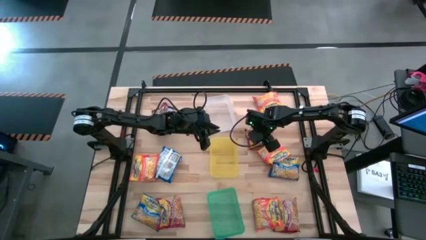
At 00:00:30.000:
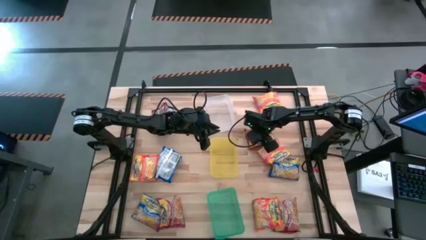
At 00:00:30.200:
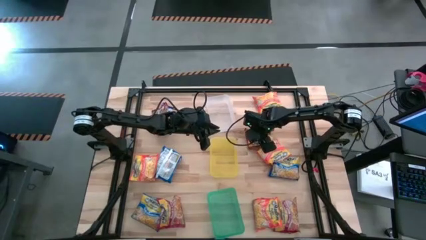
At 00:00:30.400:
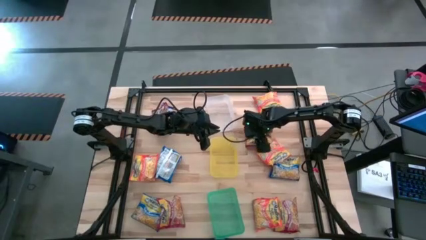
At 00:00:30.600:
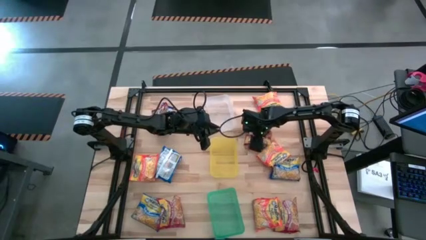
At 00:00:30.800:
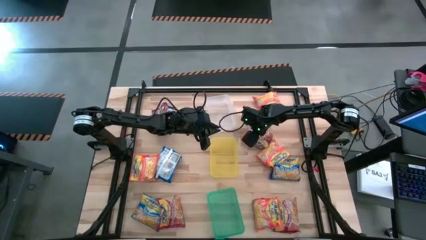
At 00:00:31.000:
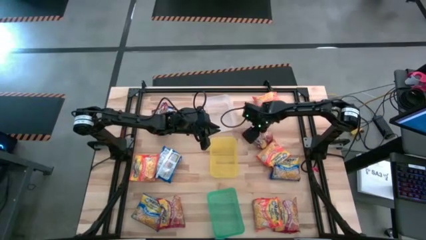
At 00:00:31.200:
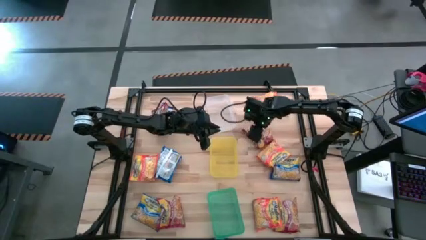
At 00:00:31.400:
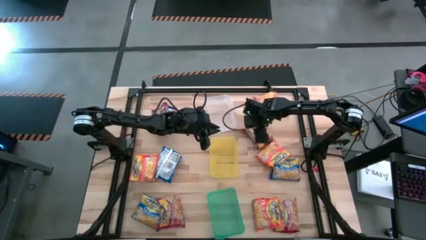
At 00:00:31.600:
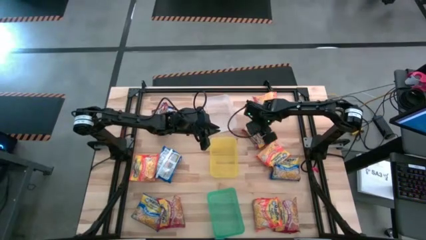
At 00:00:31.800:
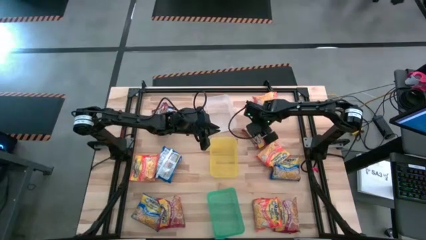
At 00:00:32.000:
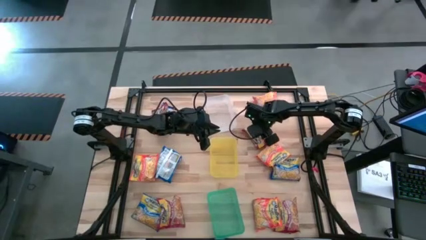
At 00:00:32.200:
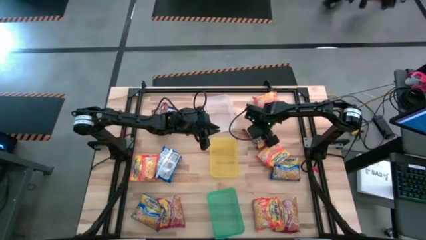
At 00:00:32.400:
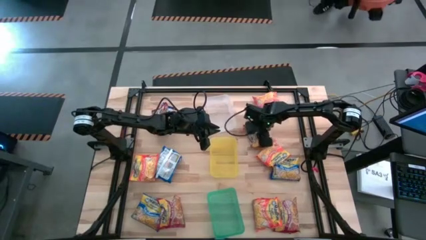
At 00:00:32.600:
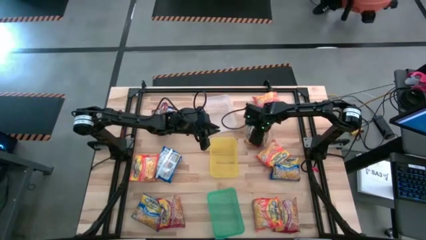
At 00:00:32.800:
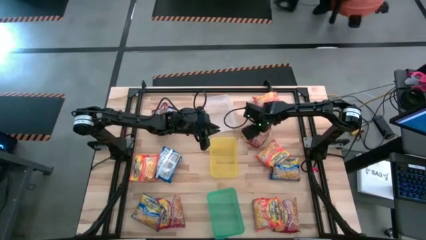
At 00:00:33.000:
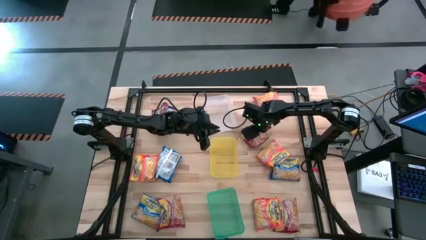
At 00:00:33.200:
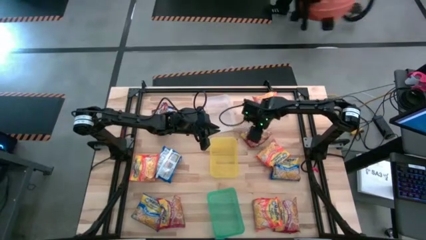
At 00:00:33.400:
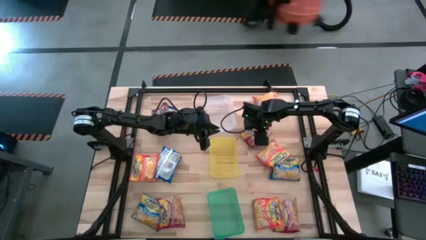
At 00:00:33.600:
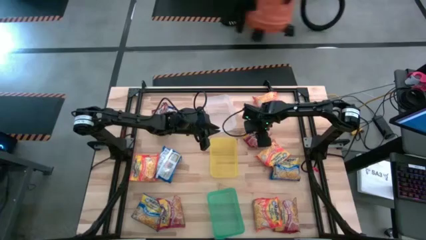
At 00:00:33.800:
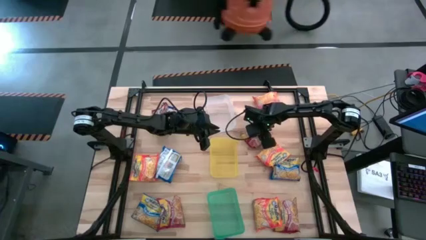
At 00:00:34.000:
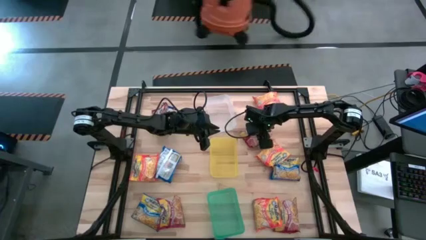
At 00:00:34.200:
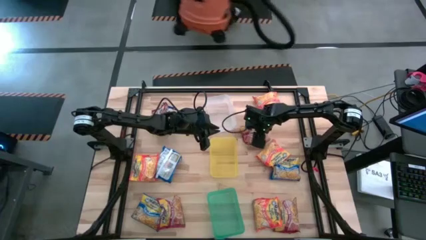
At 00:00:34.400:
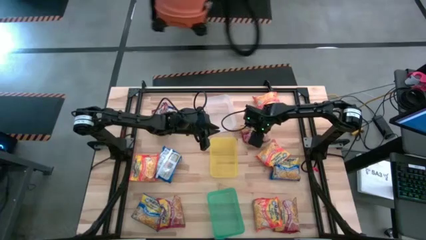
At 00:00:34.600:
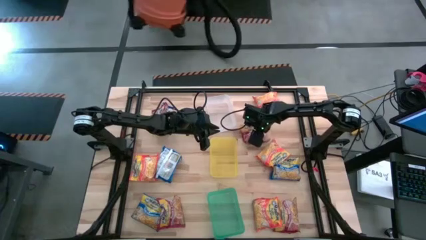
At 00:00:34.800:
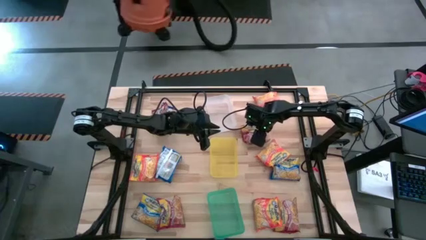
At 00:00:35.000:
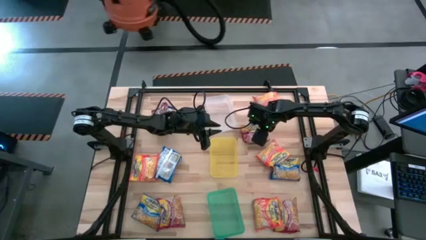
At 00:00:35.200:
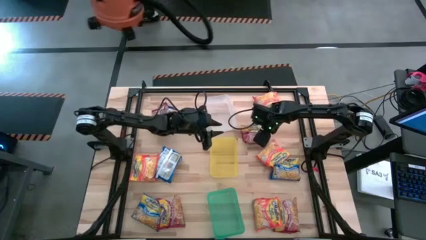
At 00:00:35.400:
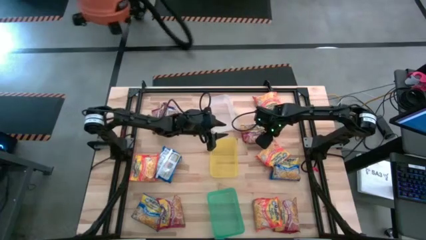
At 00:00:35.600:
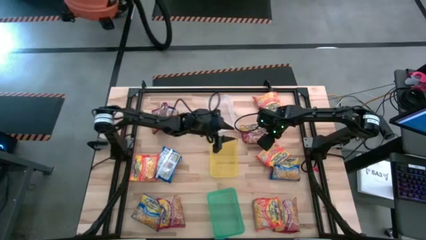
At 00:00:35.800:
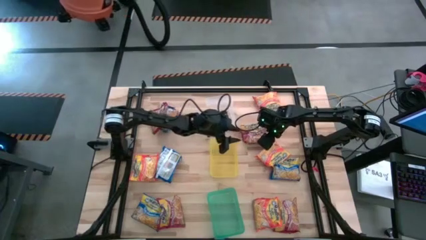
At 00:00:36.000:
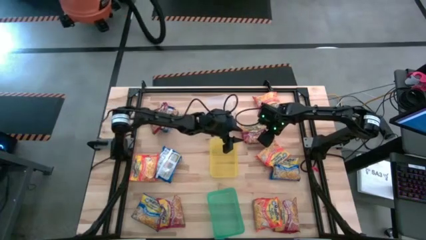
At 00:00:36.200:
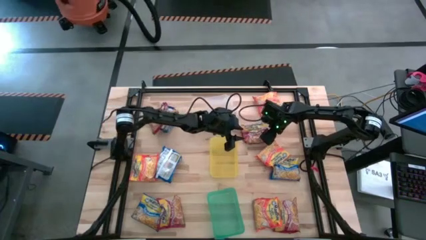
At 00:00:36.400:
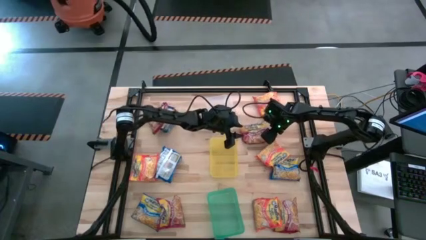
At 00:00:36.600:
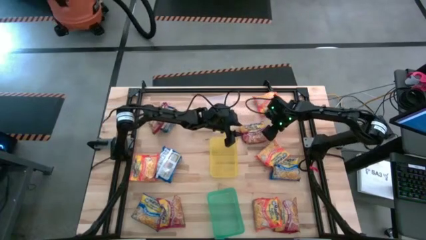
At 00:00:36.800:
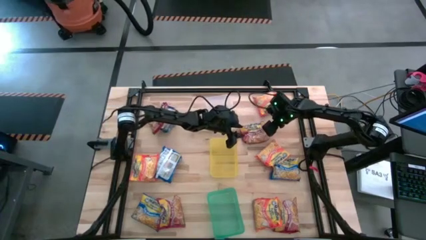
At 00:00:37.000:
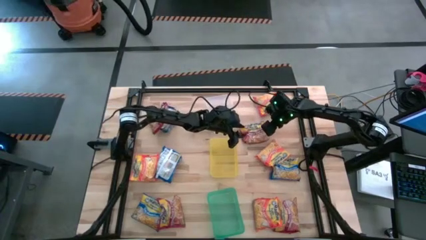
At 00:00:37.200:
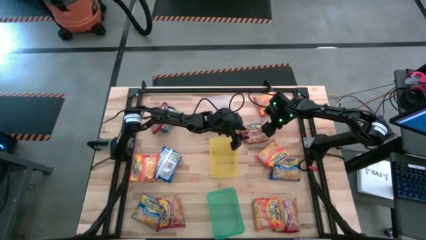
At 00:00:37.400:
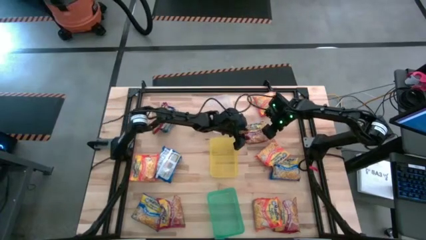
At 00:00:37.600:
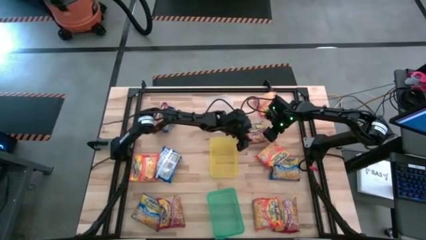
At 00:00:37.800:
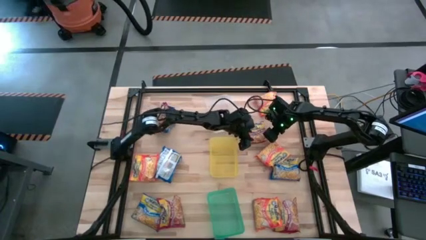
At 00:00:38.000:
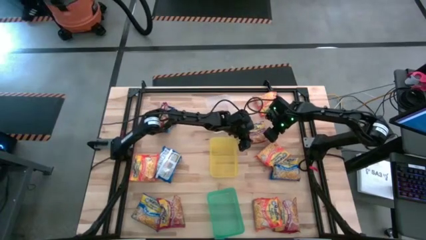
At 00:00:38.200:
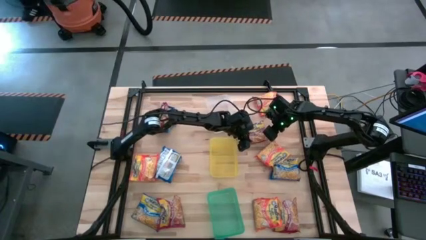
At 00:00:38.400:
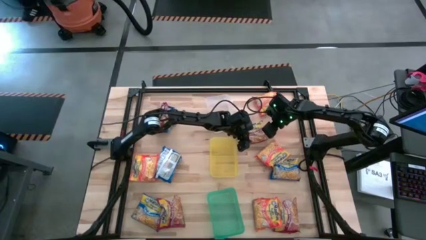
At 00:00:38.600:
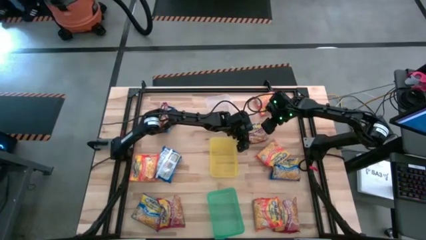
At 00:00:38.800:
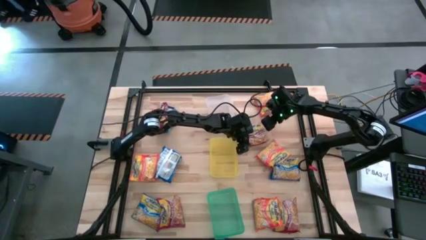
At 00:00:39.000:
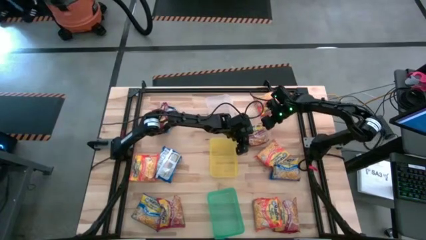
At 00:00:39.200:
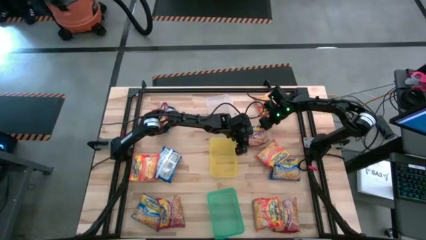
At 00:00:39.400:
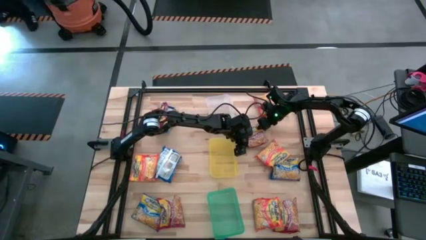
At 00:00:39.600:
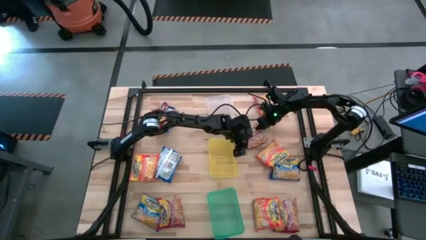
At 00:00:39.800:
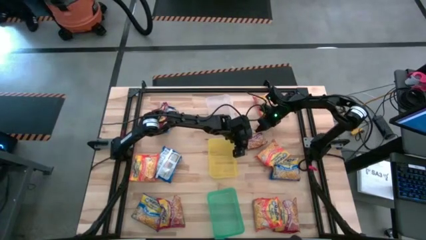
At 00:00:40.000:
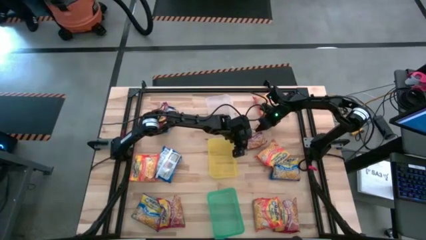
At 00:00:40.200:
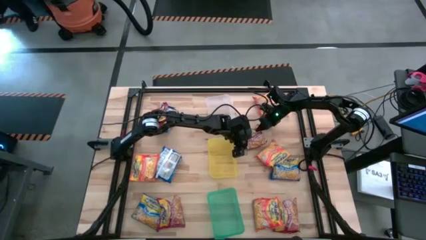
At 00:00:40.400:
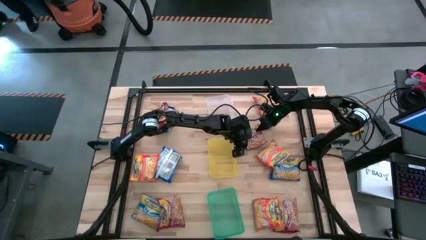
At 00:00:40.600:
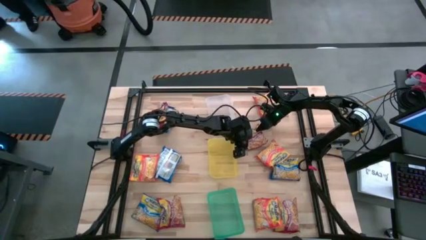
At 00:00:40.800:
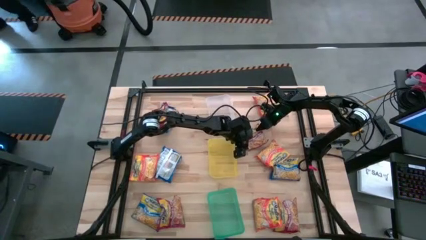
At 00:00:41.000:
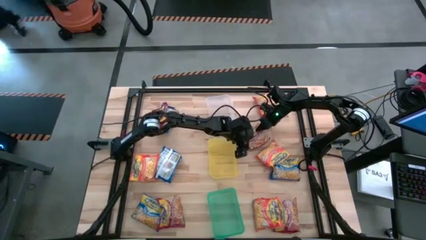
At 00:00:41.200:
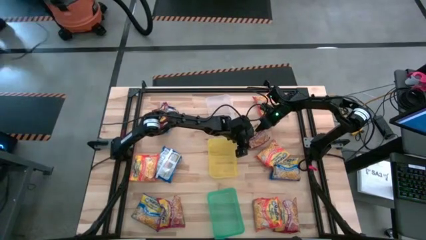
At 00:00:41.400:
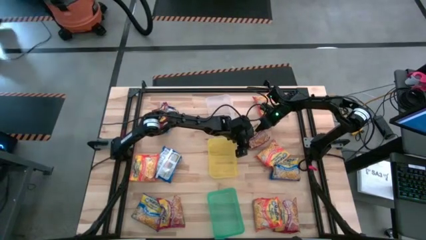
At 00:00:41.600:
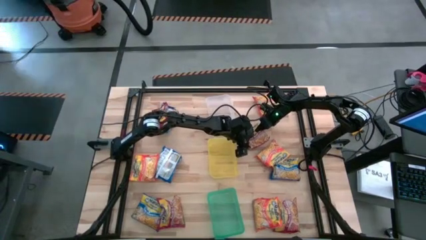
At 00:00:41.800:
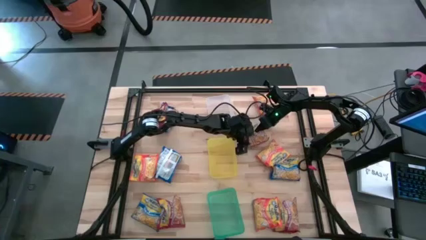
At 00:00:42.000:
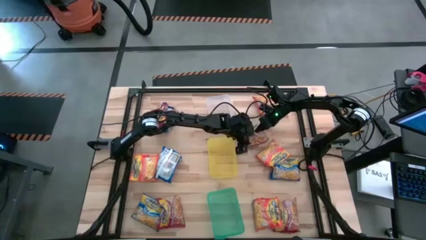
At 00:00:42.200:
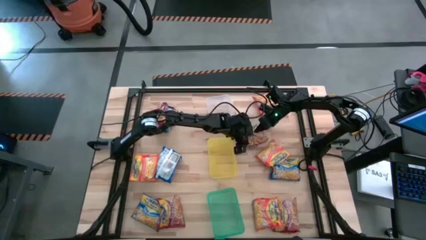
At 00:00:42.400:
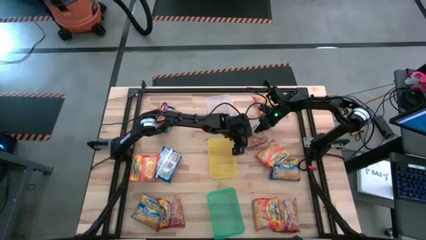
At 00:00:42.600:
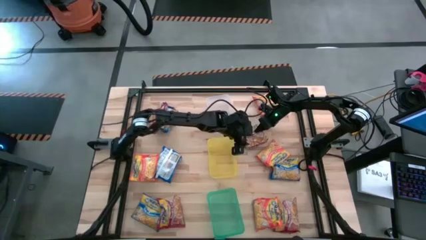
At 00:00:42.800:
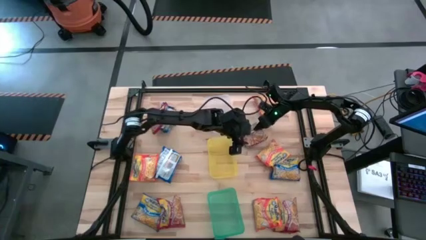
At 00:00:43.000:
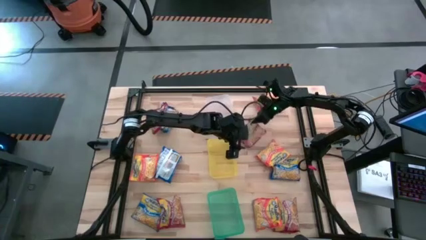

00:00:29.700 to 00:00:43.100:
Task: Sort Maruchan noodles
Put the red noodle pack into the transparent bin
